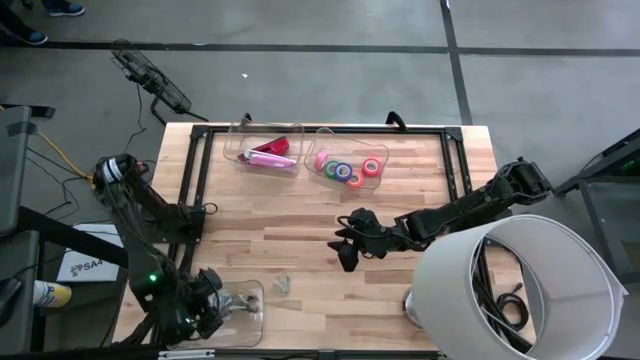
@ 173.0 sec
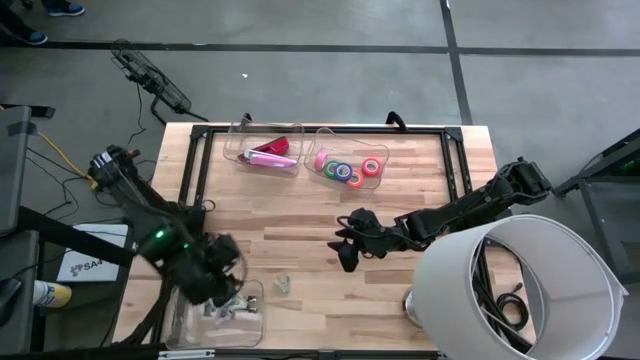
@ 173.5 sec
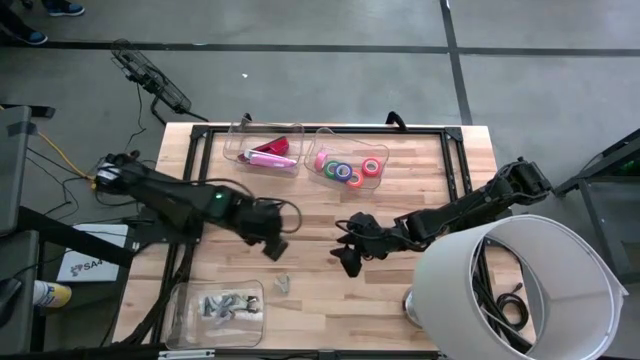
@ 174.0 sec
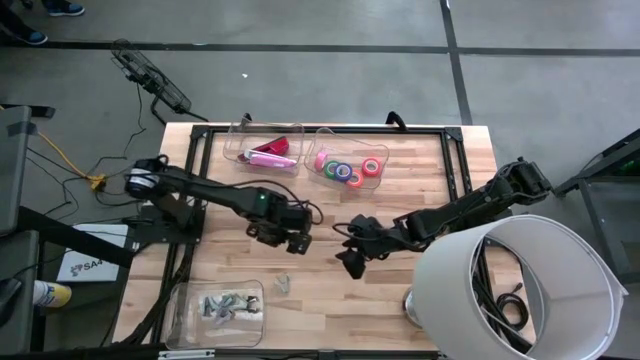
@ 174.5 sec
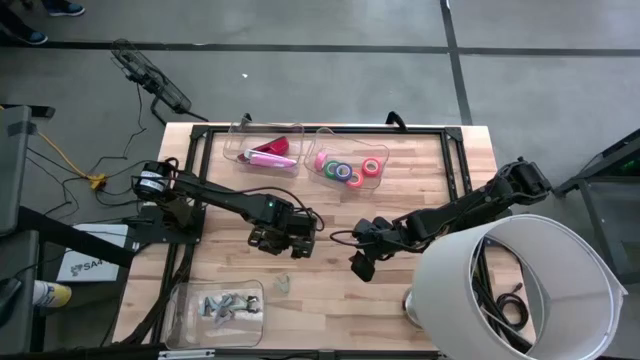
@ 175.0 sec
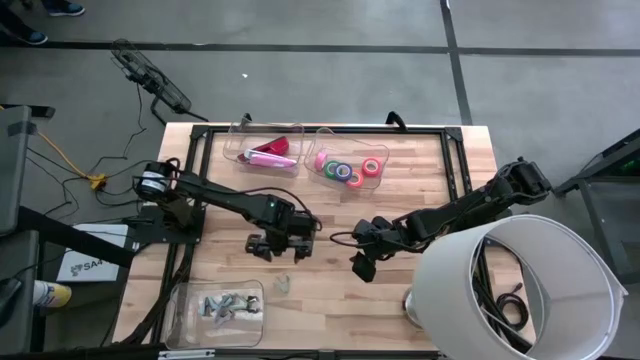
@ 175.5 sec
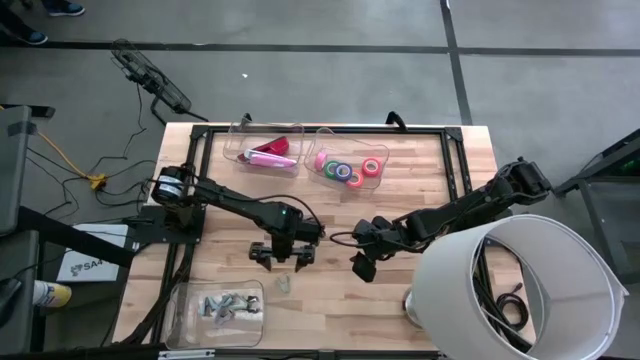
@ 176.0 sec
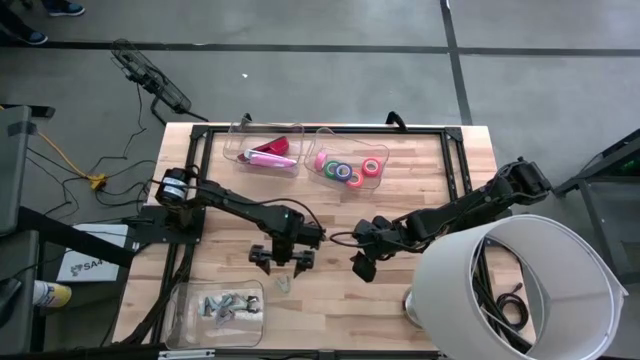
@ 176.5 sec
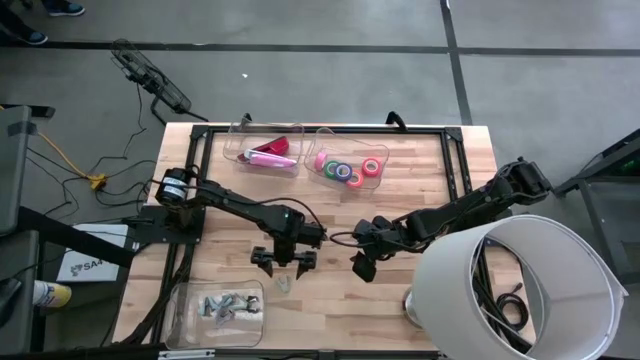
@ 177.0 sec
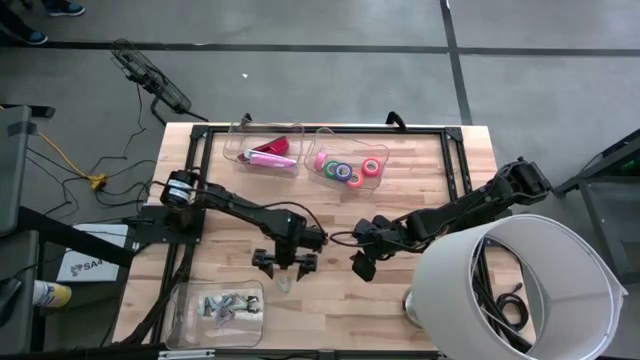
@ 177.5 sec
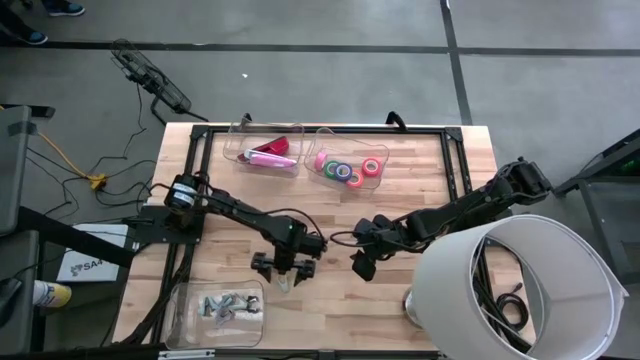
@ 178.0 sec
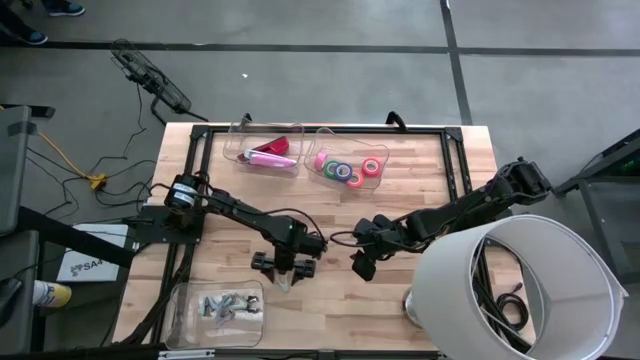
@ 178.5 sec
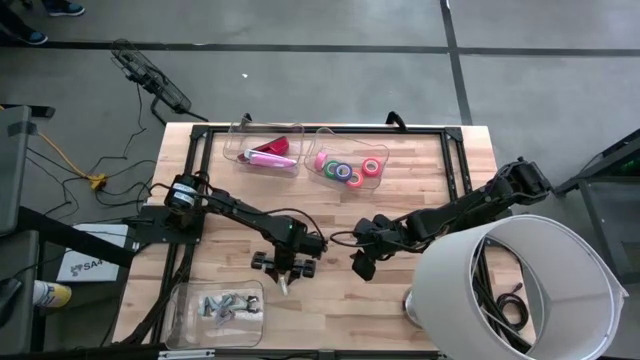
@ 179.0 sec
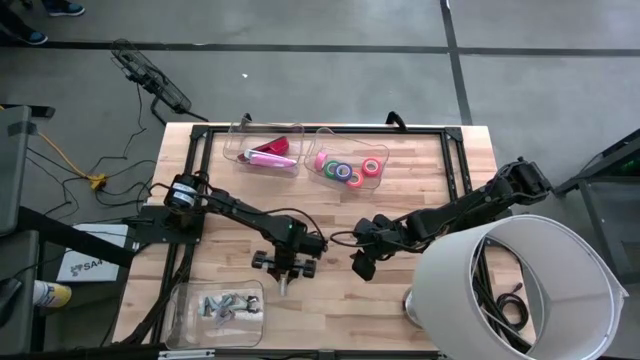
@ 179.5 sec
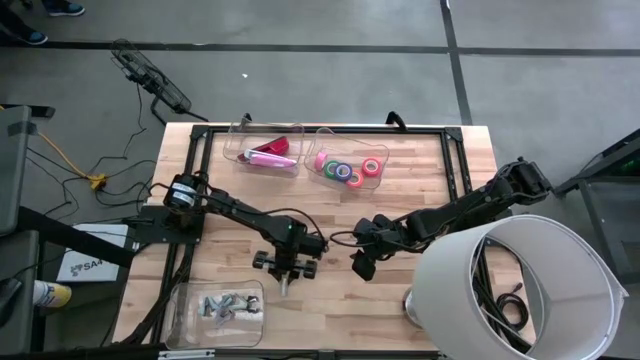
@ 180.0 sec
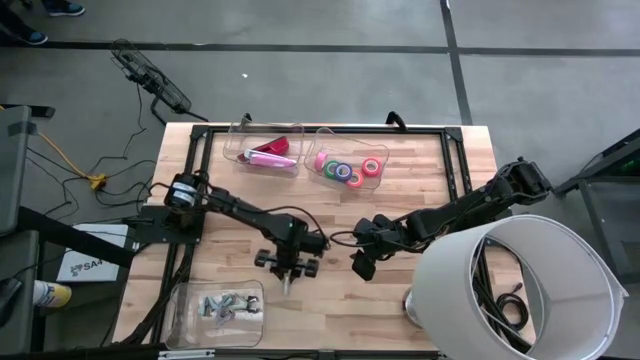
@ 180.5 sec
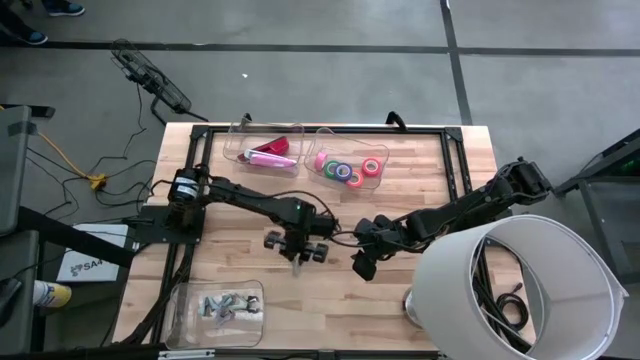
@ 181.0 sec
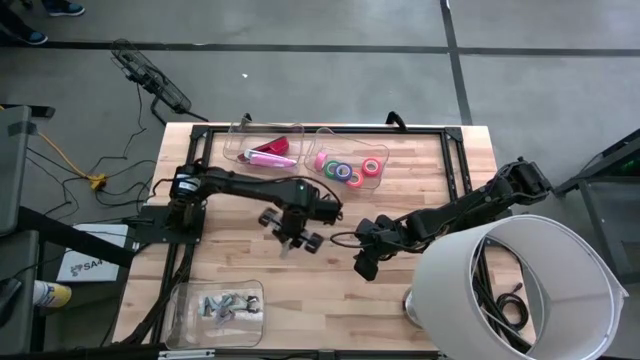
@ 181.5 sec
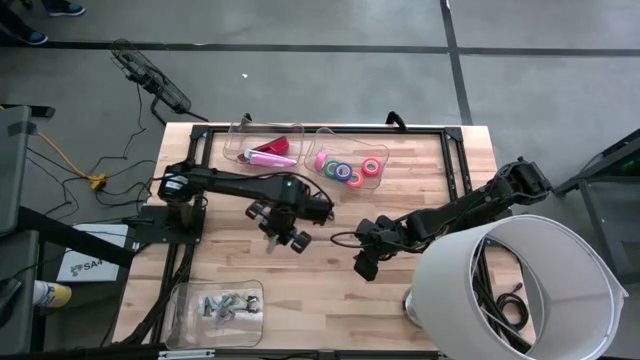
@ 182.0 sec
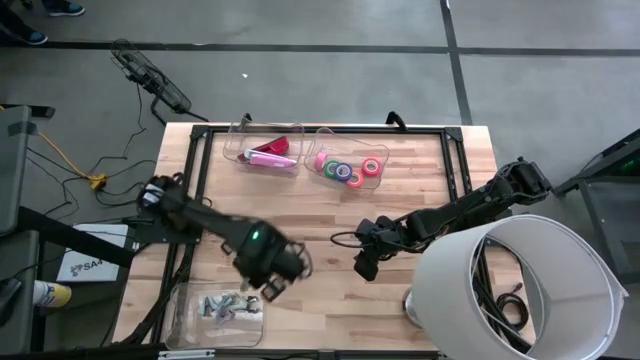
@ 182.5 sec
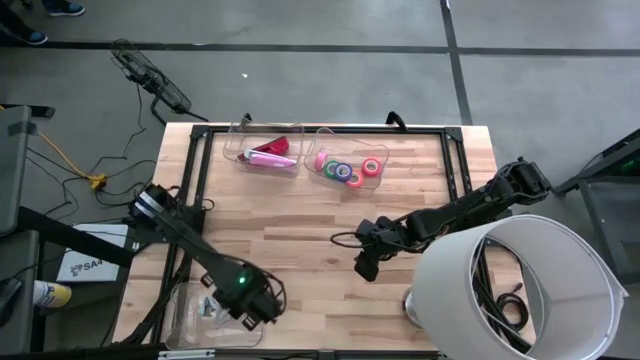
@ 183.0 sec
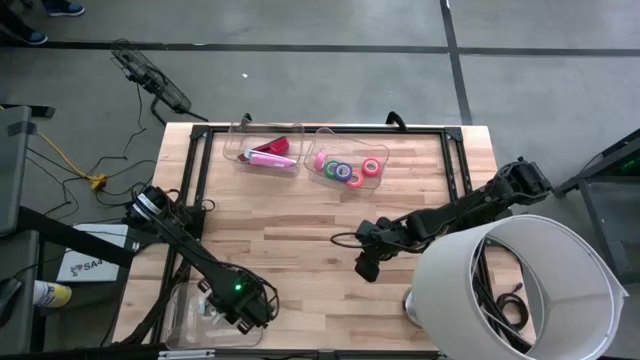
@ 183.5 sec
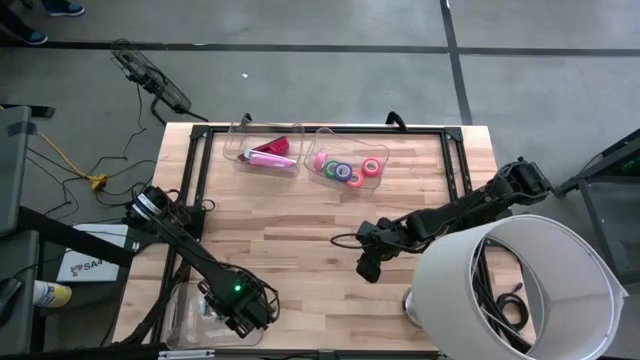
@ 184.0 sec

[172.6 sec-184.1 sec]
Task: Pick and place Stapler, Stapler remover, tape
Put the gray stapler remover into the bottom transparent bin

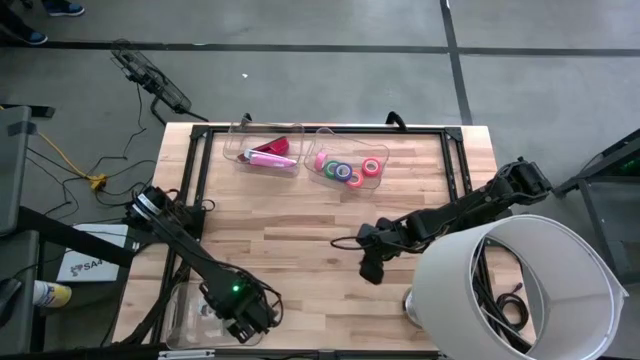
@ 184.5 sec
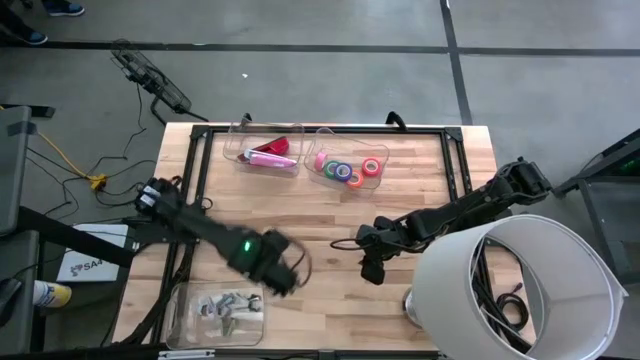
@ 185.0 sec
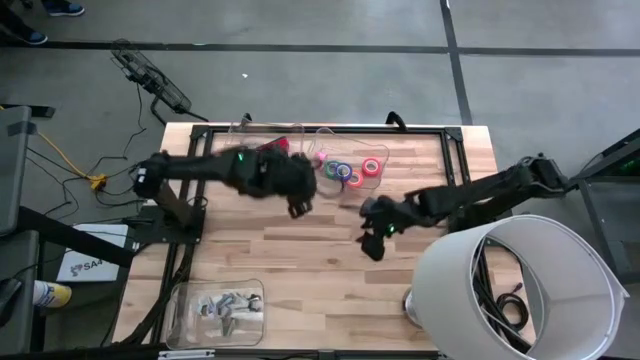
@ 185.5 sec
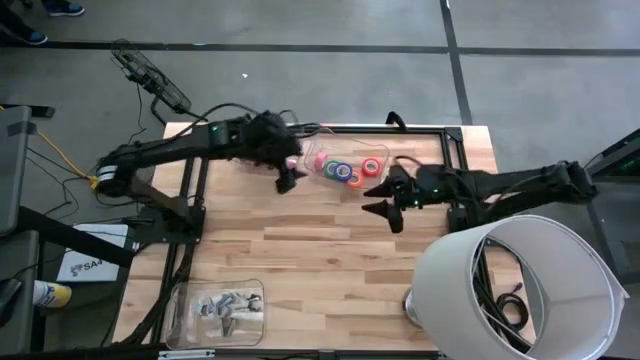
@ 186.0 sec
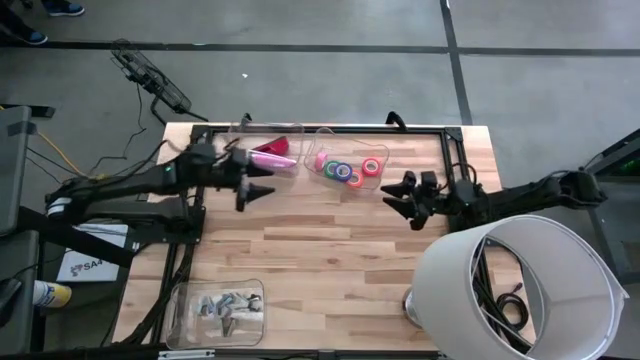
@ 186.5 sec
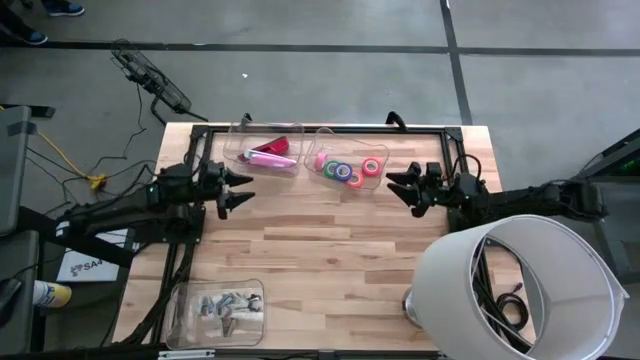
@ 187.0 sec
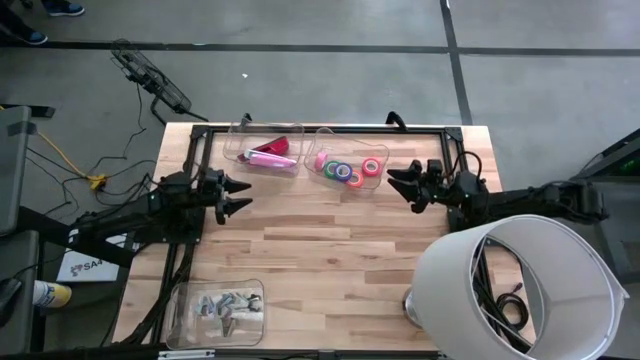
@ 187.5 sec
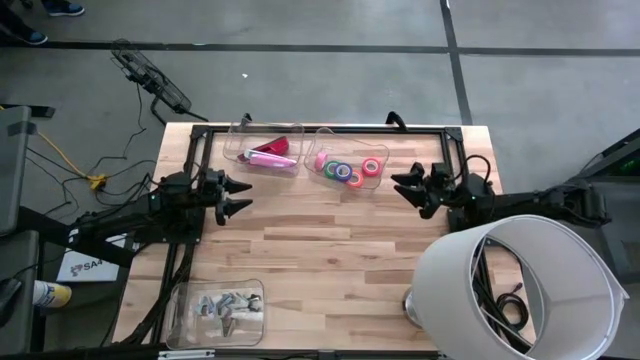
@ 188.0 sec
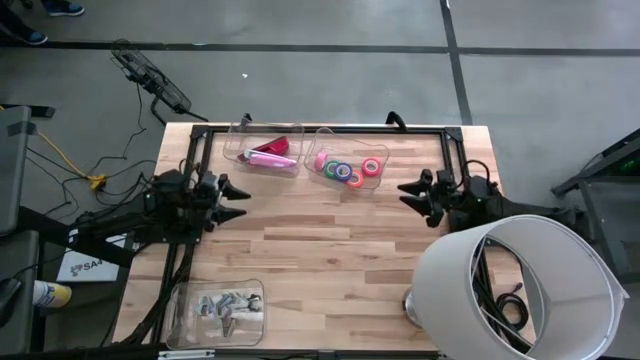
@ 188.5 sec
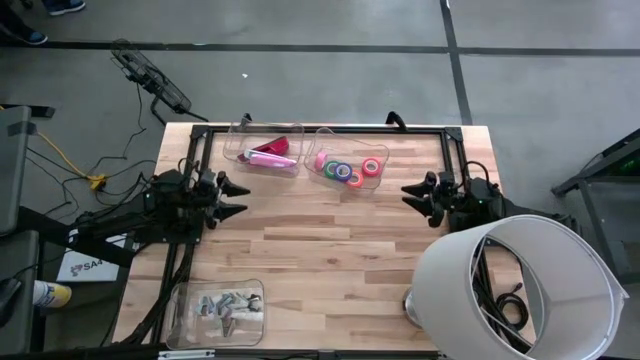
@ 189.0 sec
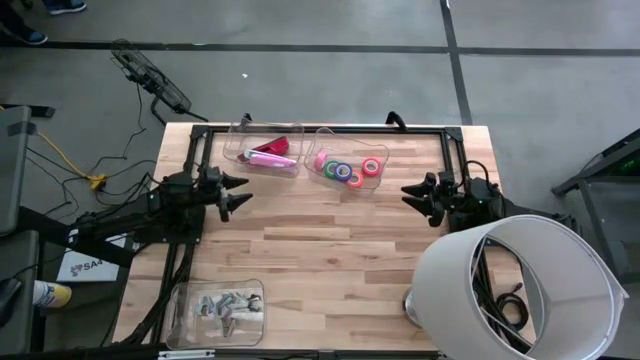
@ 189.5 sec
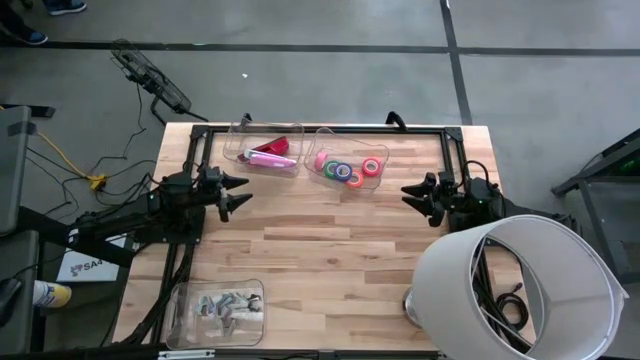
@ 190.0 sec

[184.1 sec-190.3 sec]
Return to Home Position

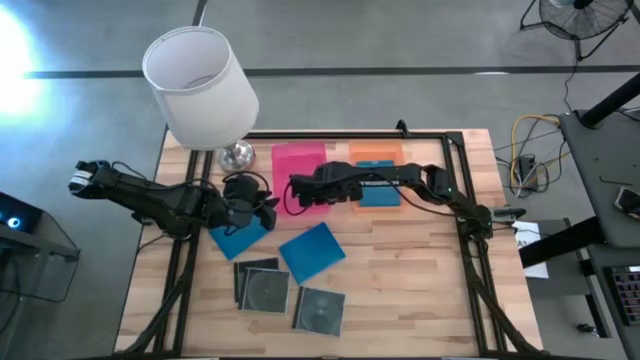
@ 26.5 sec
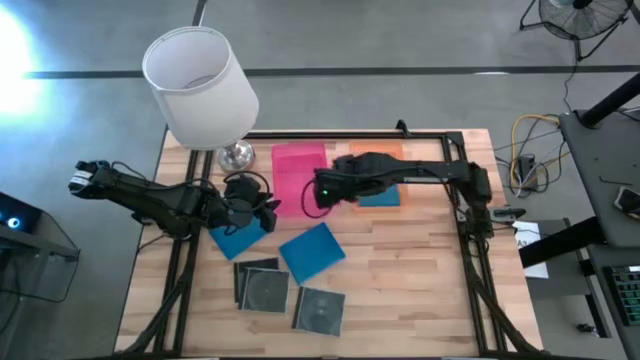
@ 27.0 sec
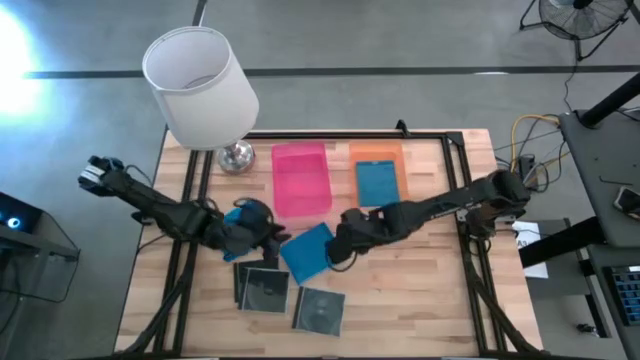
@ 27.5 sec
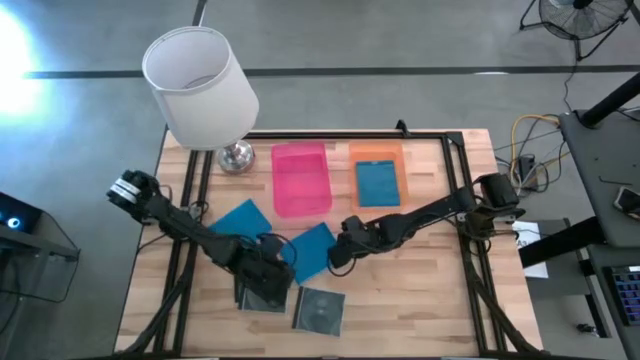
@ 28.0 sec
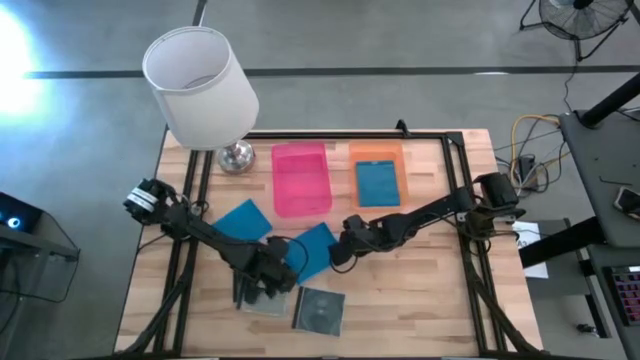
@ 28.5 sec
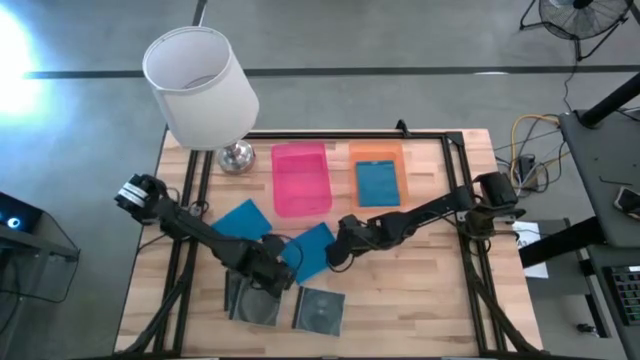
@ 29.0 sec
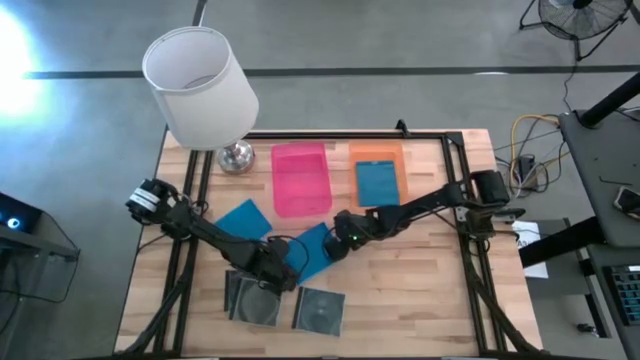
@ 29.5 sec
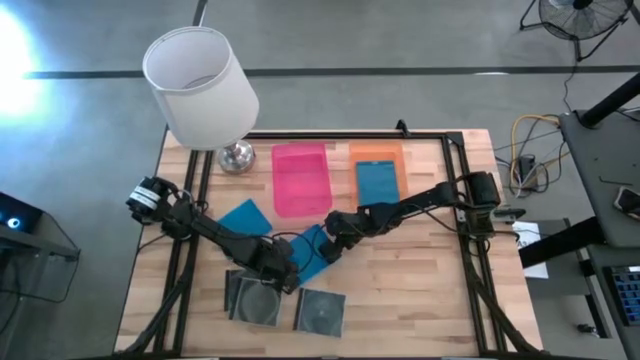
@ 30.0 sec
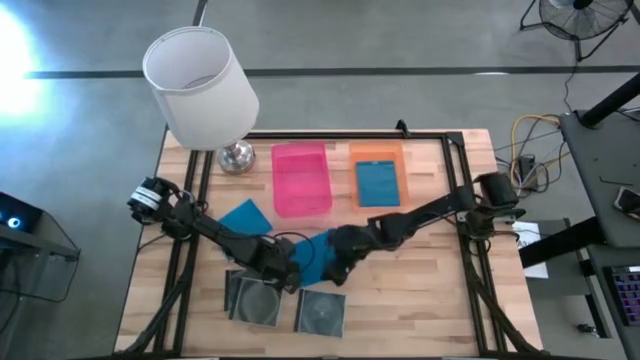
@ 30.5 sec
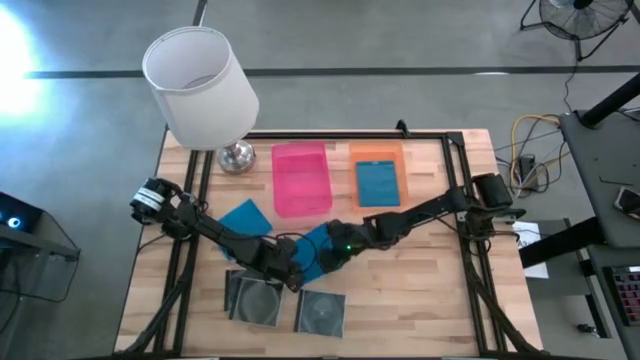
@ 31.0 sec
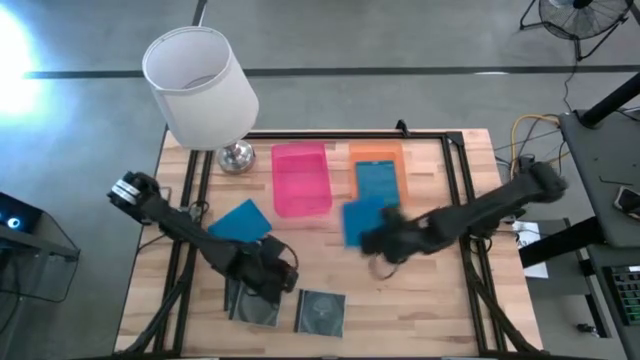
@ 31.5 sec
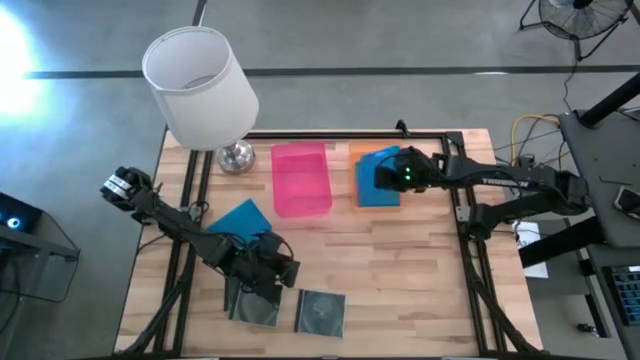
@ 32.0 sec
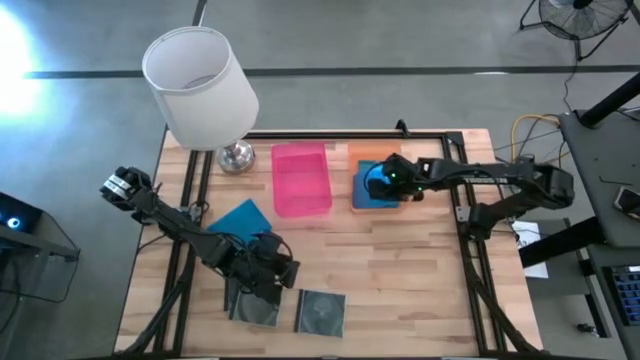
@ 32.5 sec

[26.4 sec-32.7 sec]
Task: Pick & place jewel cases by type
Put the blue cd case into the orange bin
